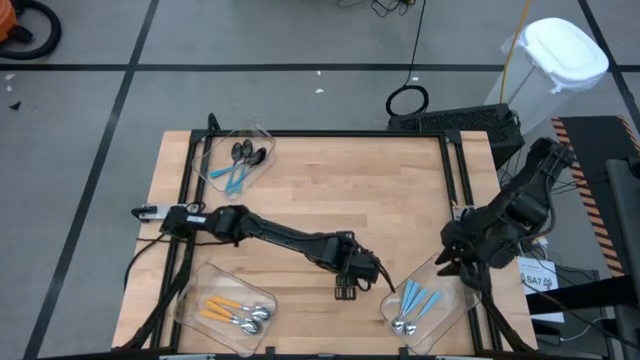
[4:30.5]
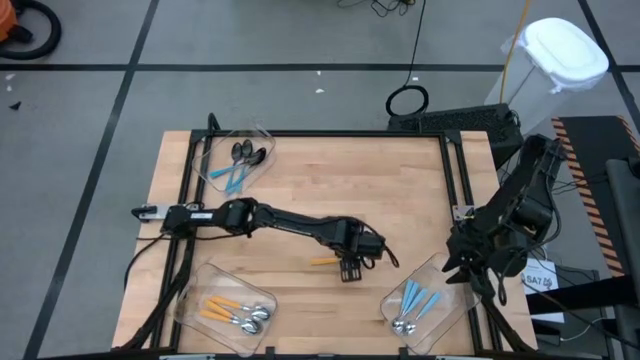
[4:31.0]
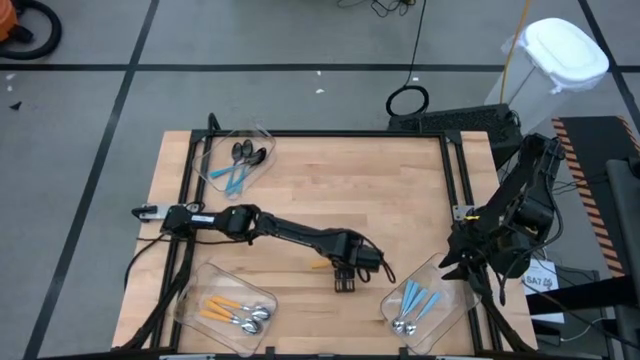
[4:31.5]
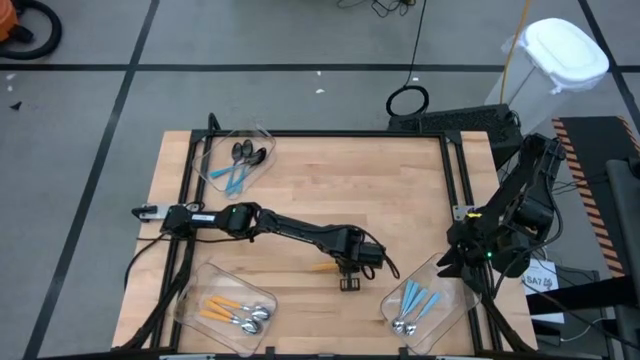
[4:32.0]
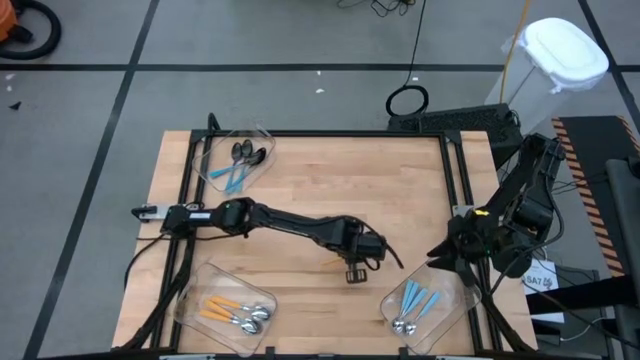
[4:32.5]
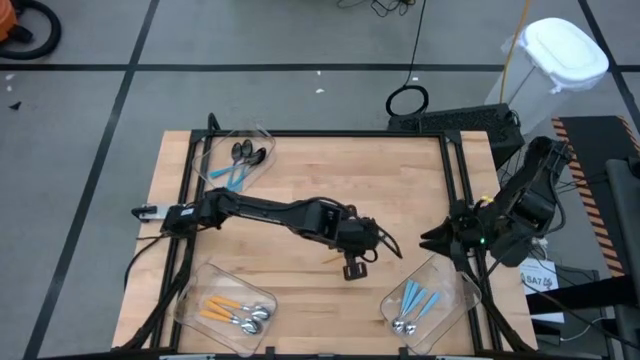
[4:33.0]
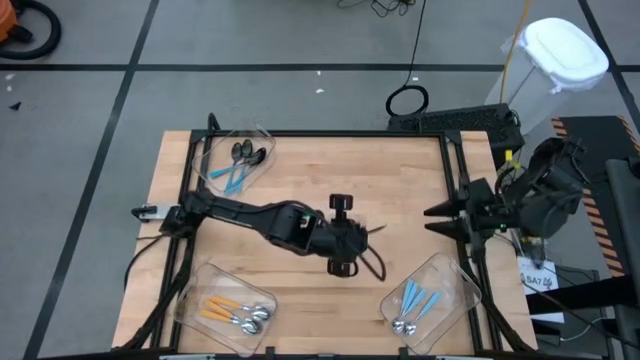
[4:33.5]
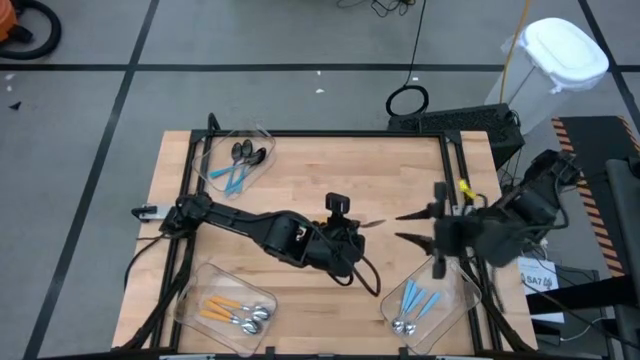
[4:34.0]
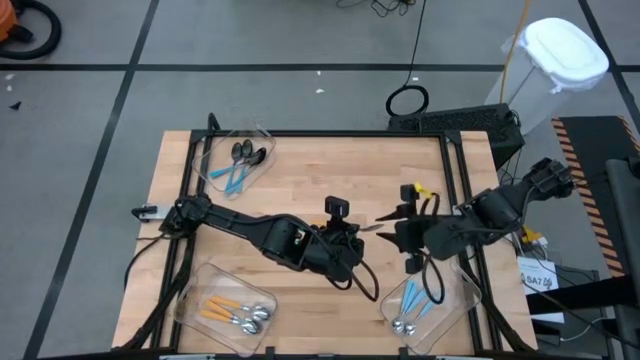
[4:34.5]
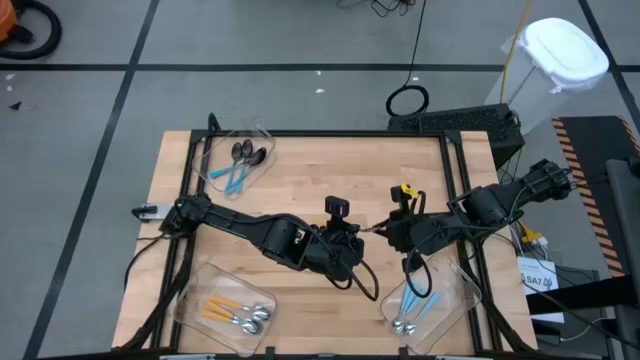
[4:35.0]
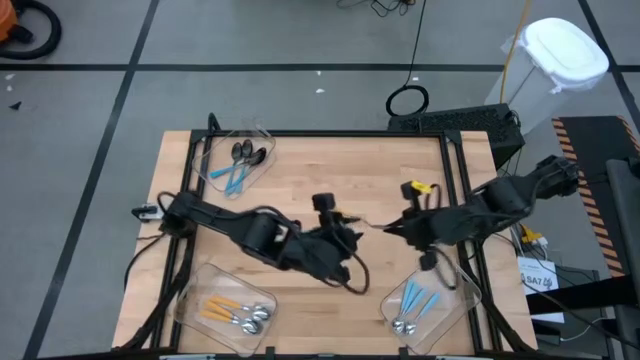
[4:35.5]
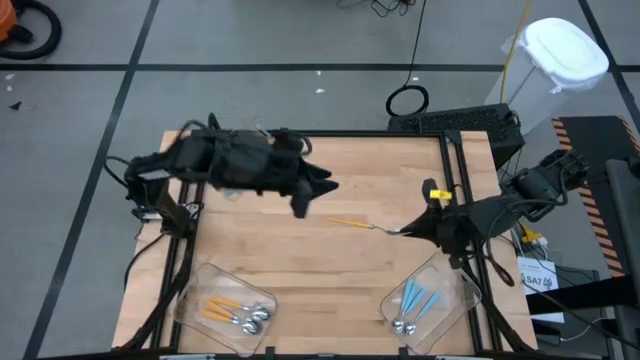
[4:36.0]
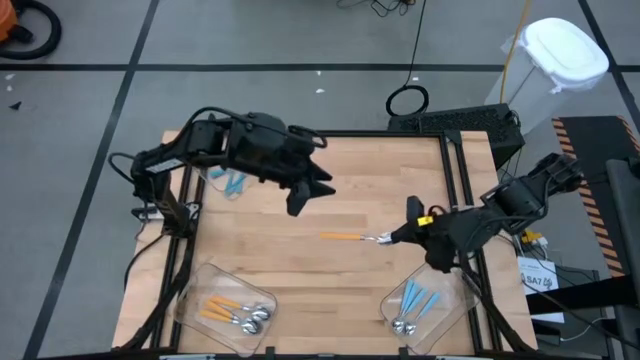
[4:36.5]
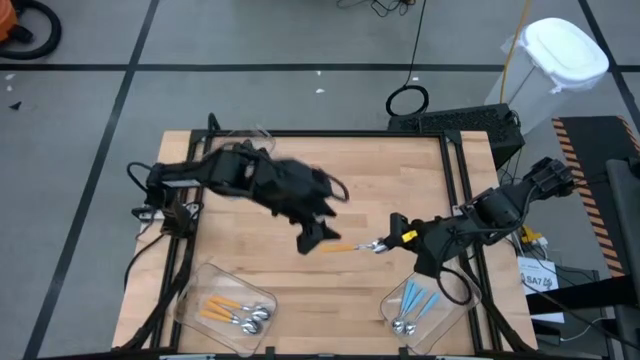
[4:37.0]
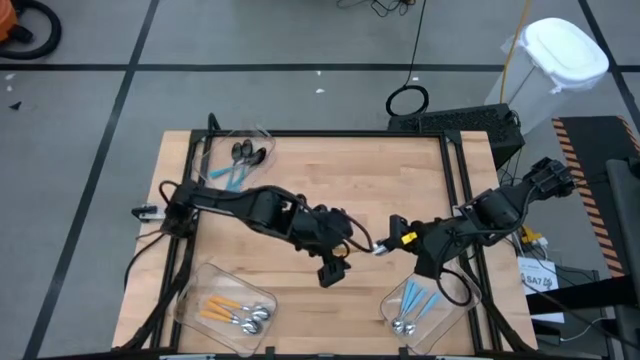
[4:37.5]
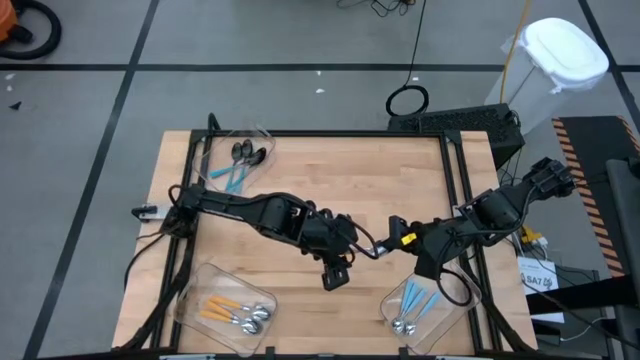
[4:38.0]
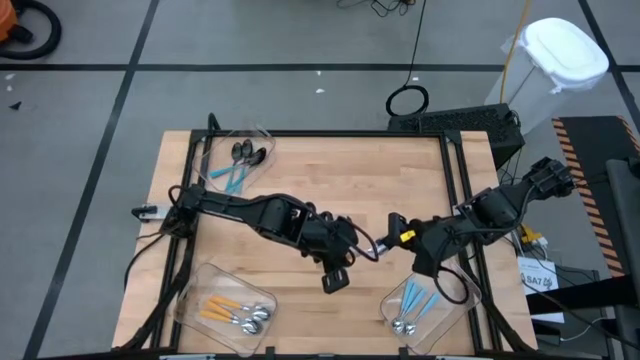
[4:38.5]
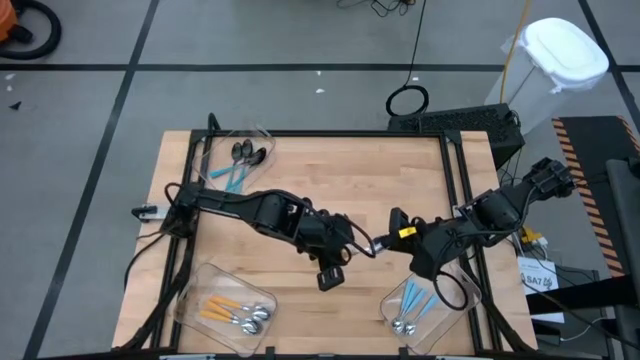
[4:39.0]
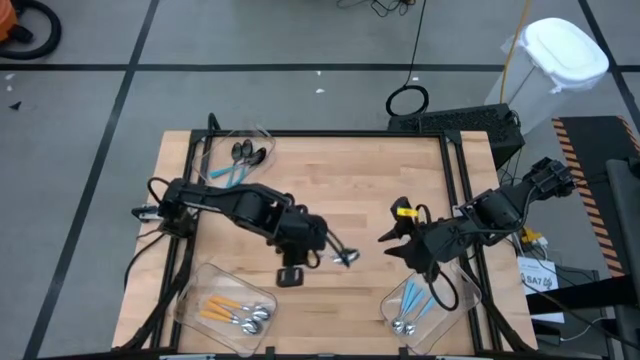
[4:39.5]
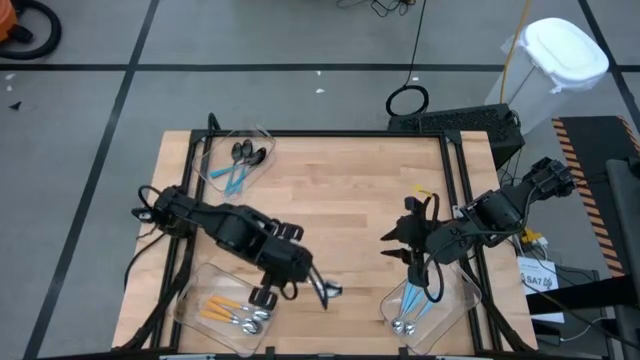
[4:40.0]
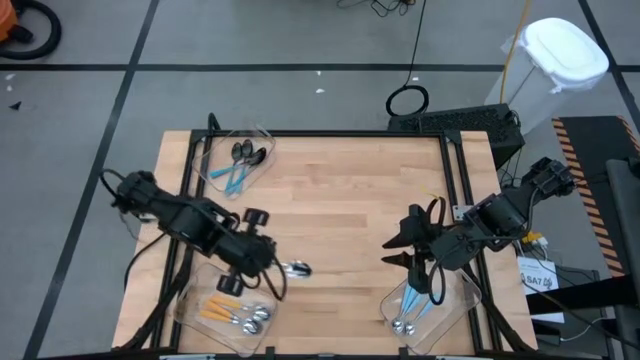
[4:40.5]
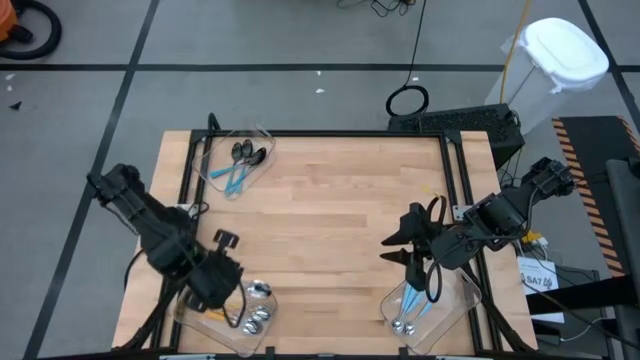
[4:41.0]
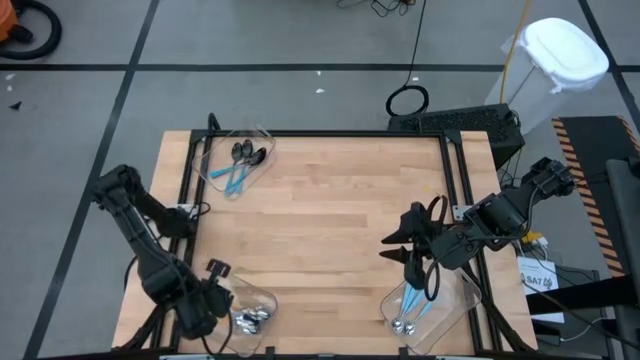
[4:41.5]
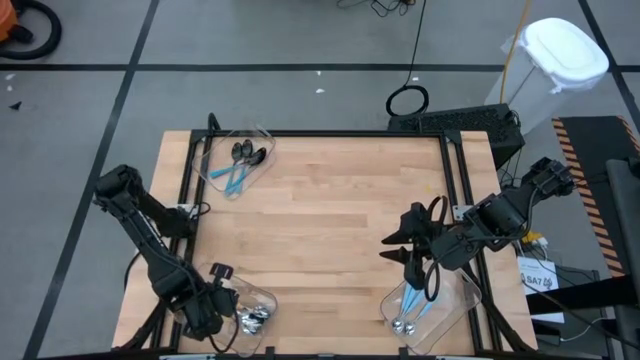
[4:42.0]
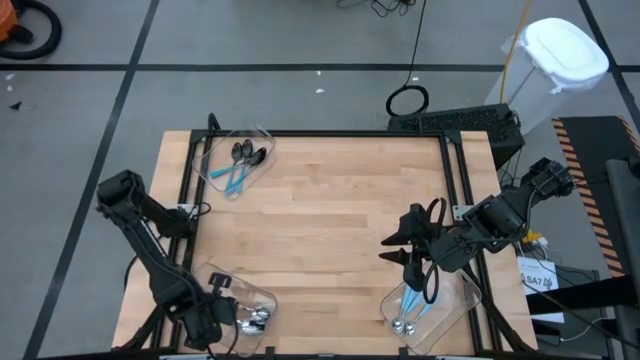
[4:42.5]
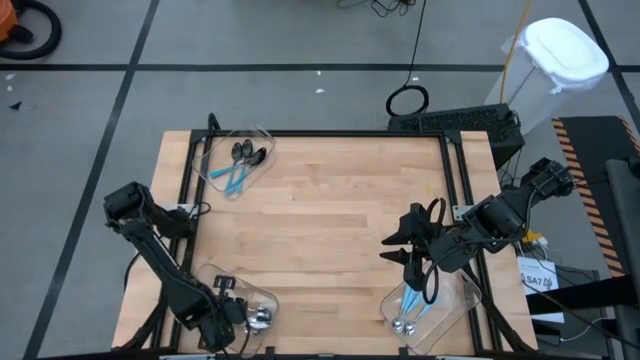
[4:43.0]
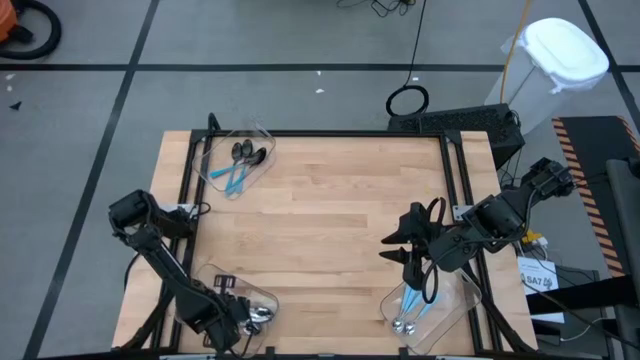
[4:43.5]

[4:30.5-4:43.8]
Task: Sort silverware by color (type)
Put the yellow spoon into the bottom left transparent bin

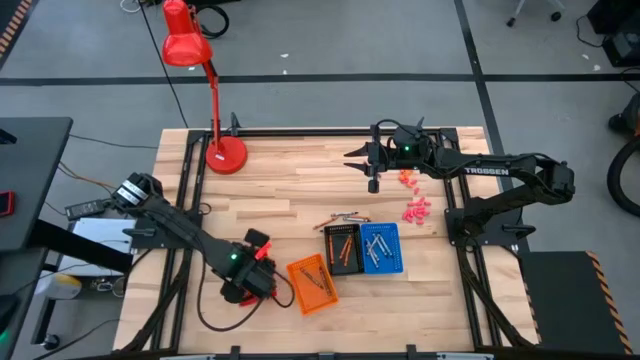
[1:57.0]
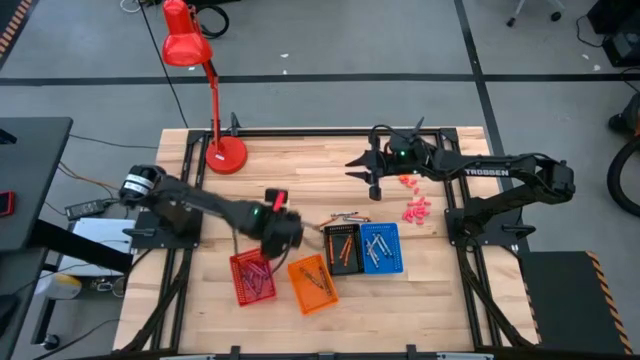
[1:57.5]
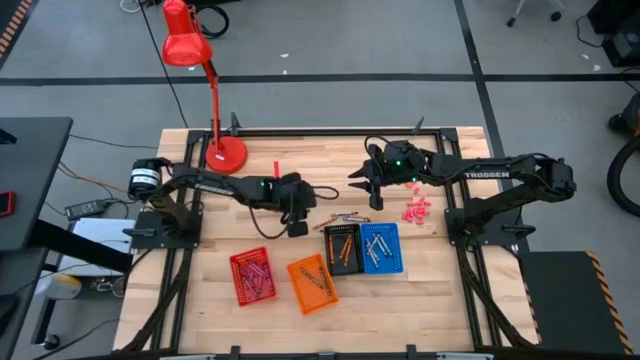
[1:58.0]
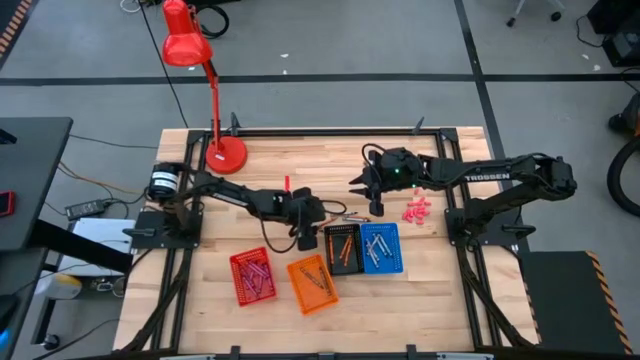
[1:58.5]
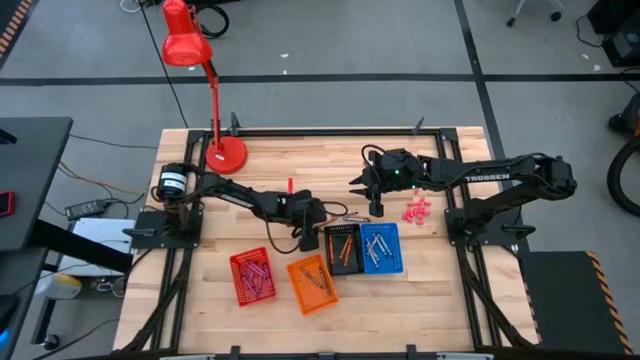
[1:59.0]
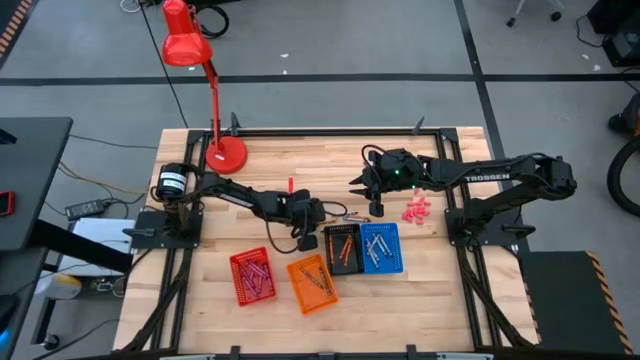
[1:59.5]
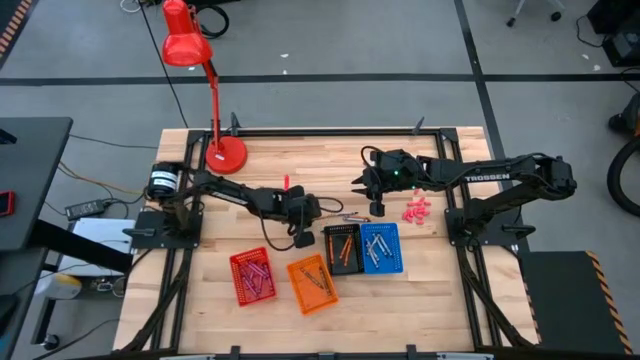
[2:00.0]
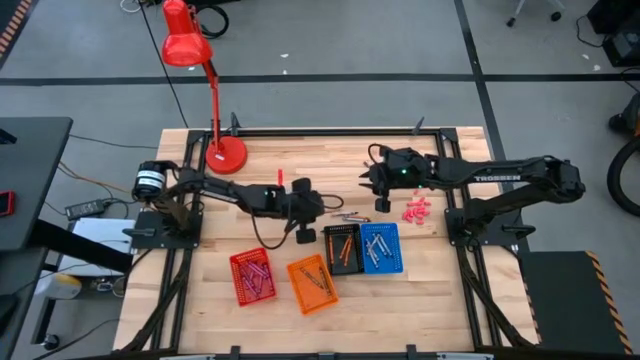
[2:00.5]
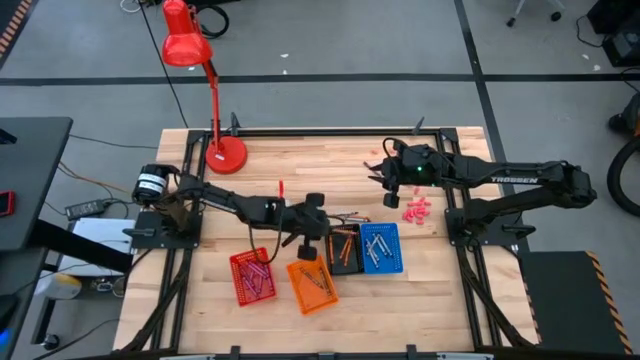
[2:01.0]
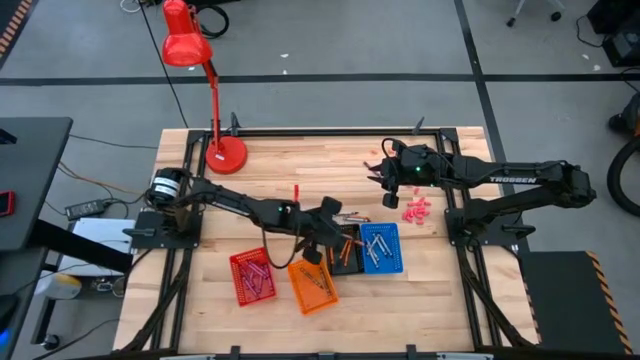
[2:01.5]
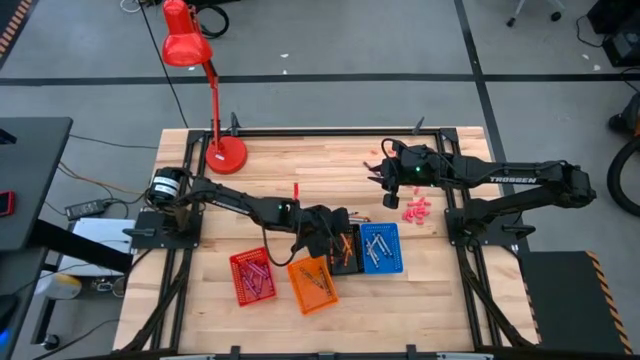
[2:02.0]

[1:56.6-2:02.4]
Task: Sort crayons
Put the orange crayon into the black bin
